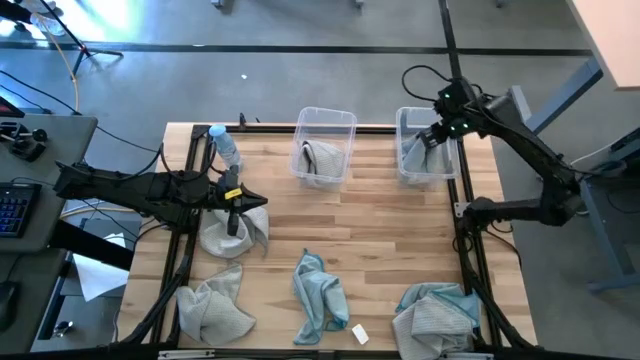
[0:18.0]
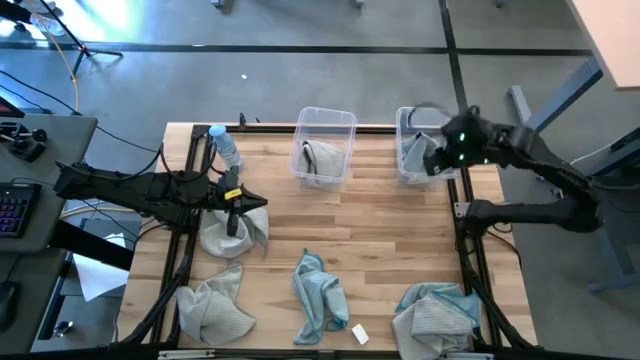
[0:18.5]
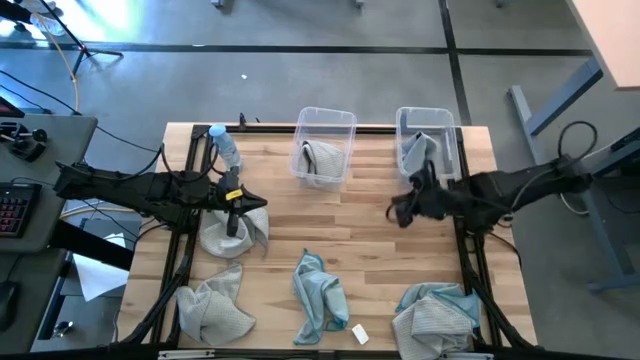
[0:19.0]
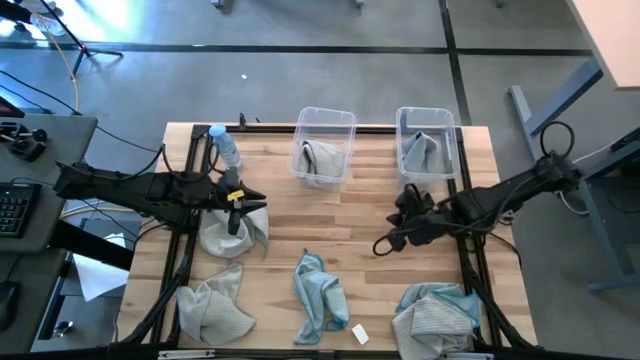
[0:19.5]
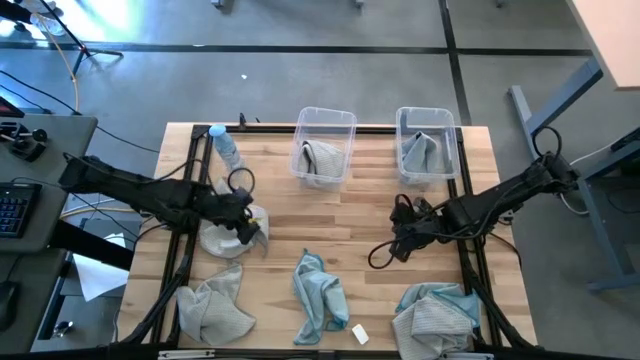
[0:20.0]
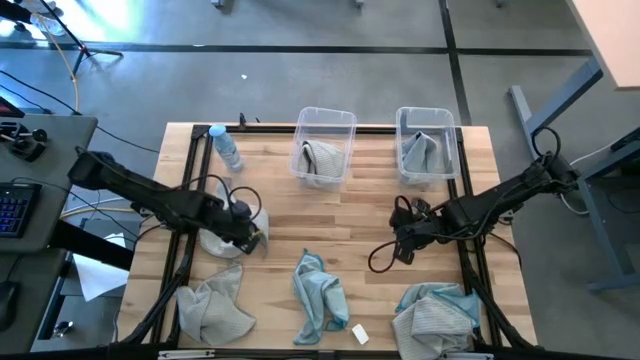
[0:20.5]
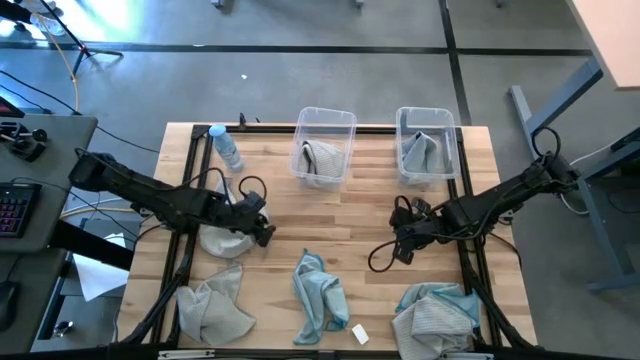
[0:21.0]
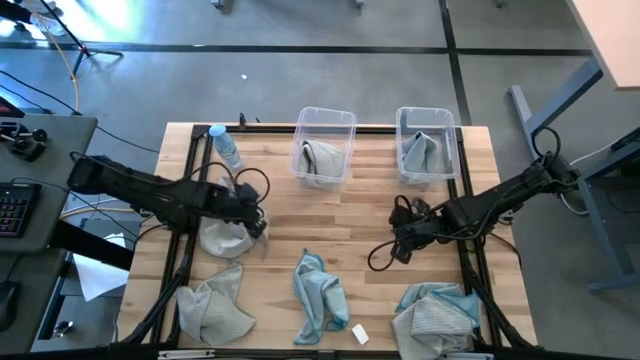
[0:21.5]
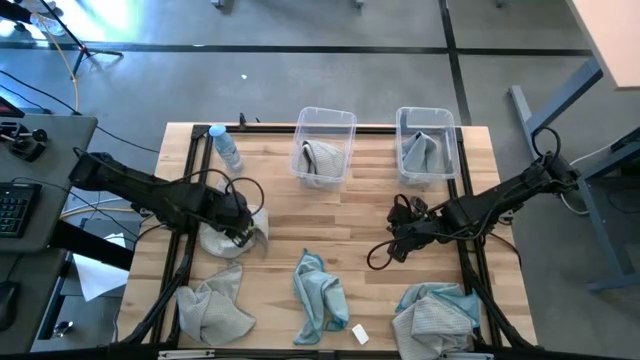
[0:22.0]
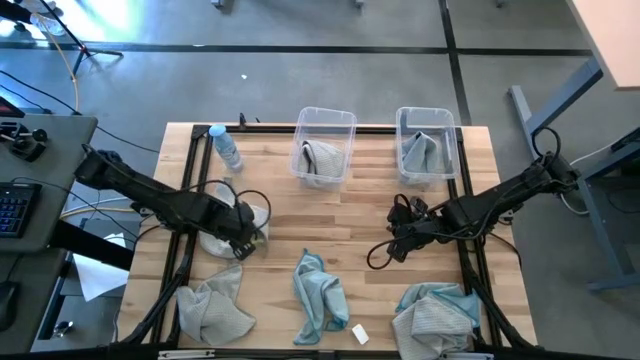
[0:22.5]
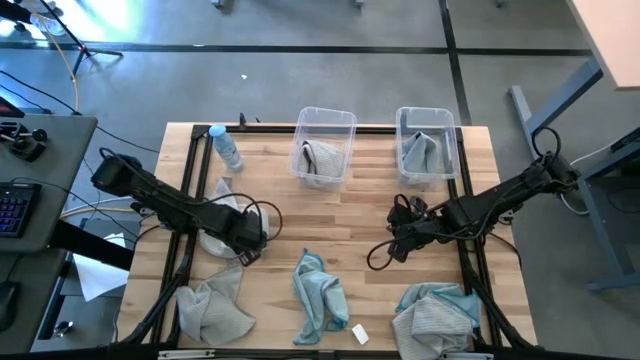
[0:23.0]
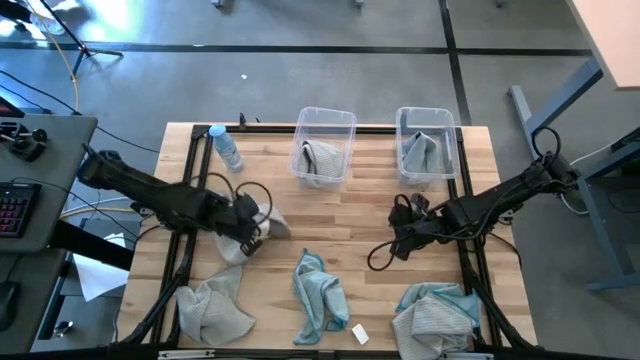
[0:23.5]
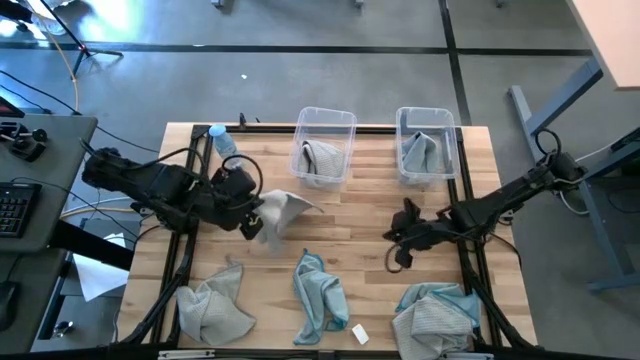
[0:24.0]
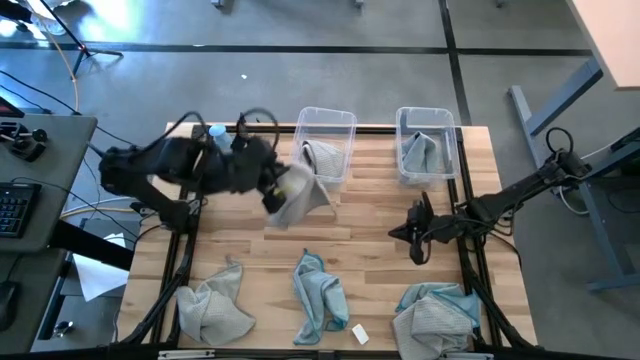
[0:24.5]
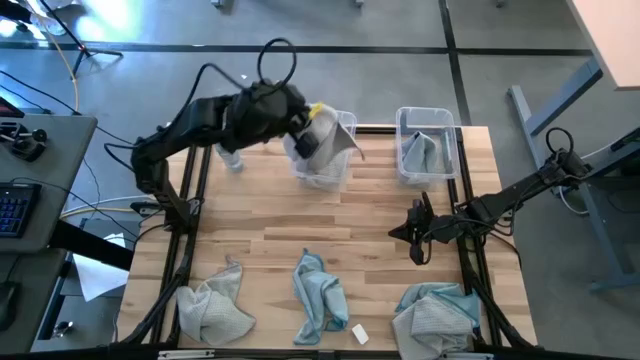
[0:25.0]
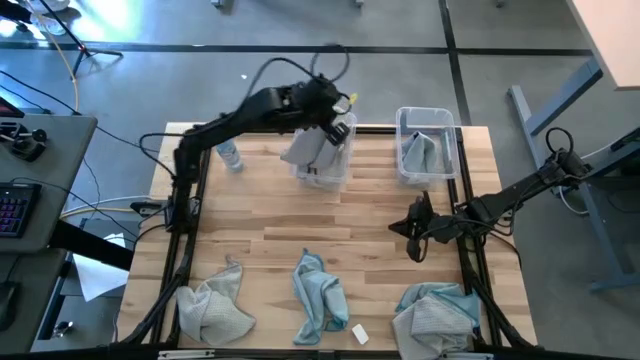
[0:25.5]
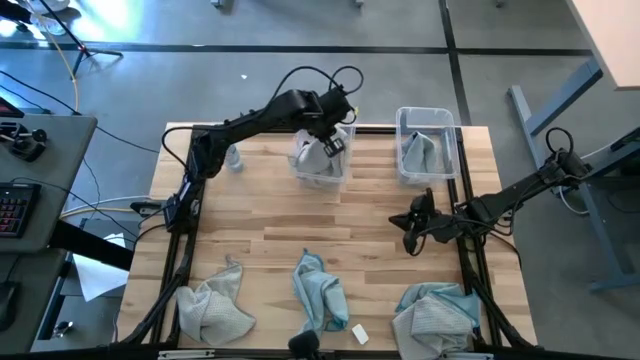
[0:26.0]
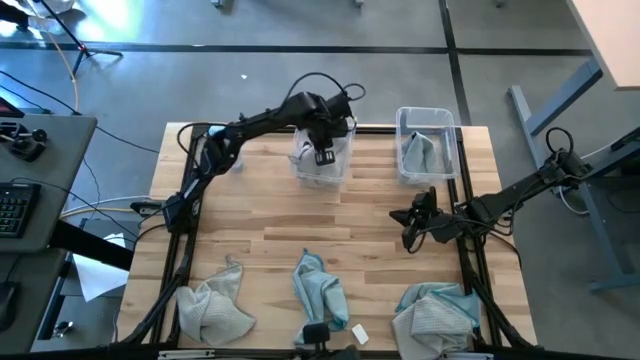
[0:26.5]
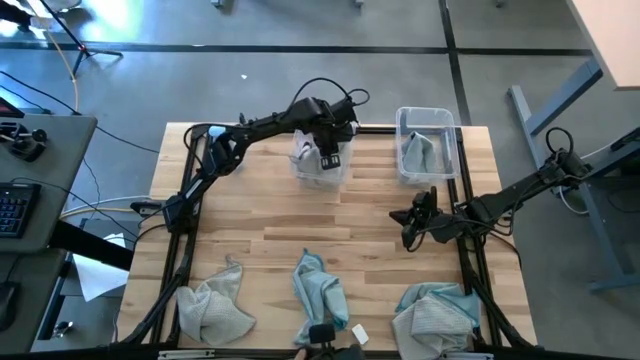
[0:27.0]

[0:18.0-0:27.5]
Task: Sort microfiber towel by color & place in baskets
Put the white microfiber cloth into the left transparent bin

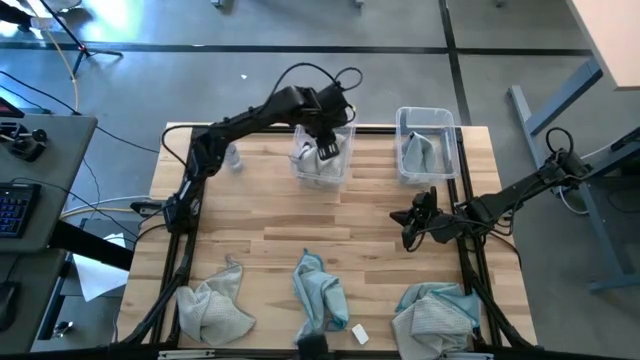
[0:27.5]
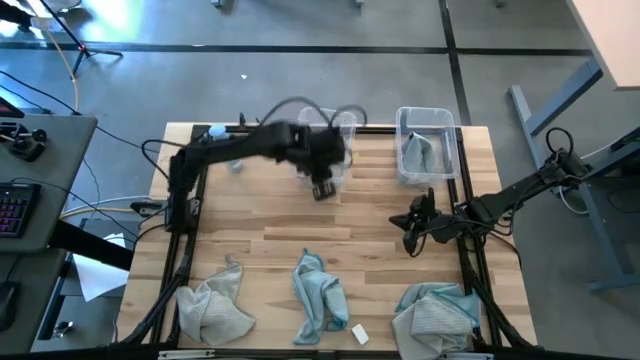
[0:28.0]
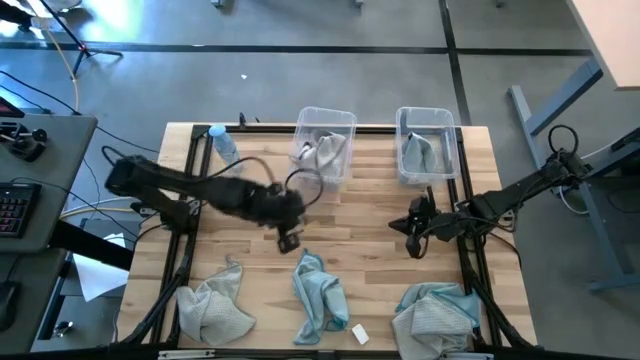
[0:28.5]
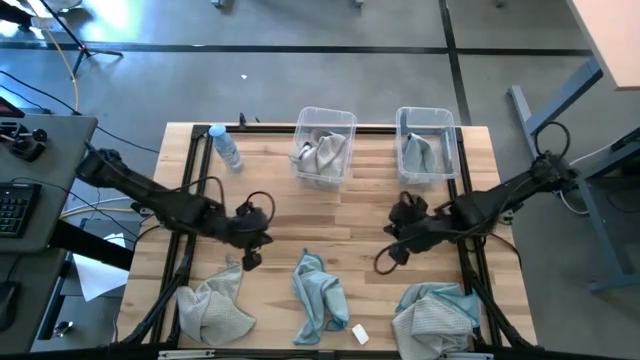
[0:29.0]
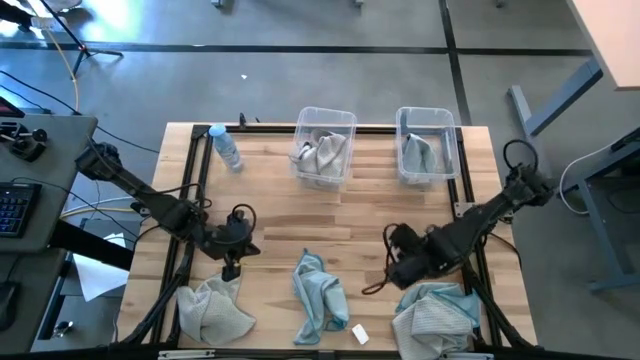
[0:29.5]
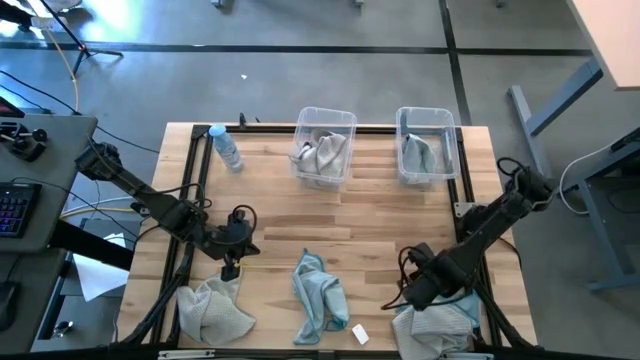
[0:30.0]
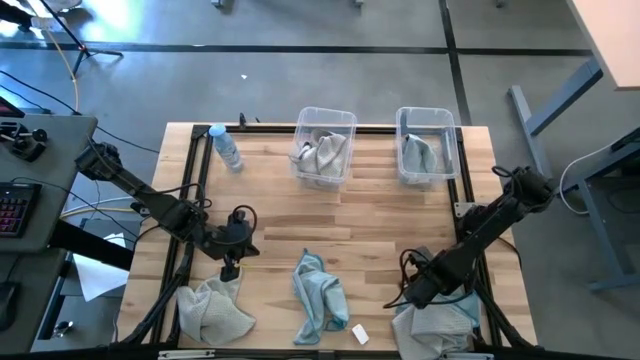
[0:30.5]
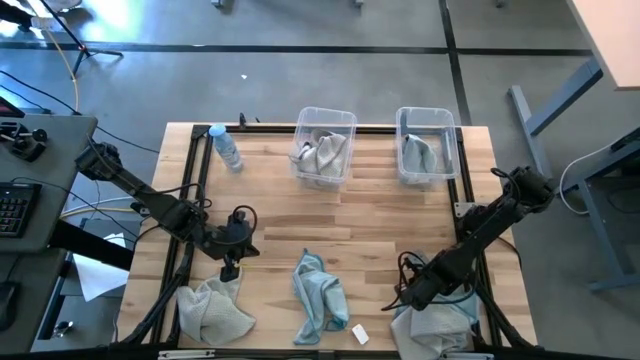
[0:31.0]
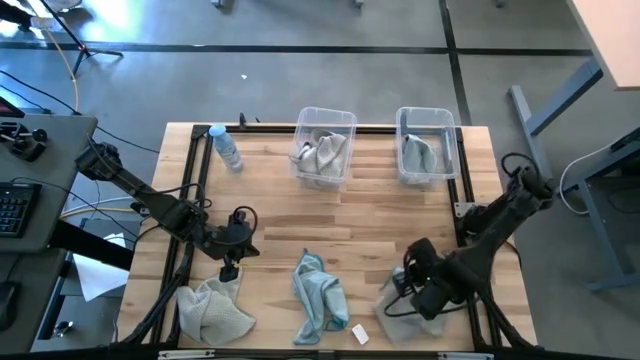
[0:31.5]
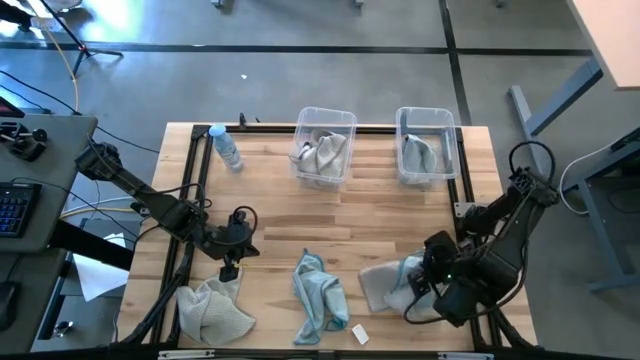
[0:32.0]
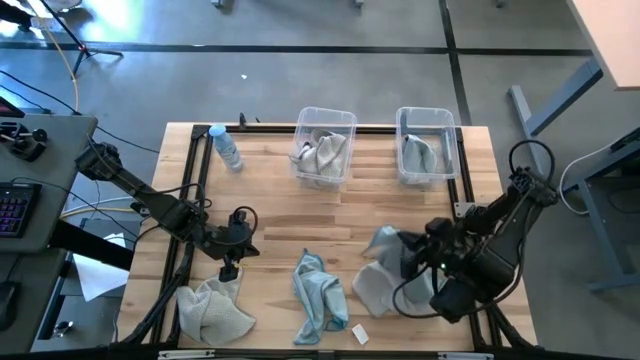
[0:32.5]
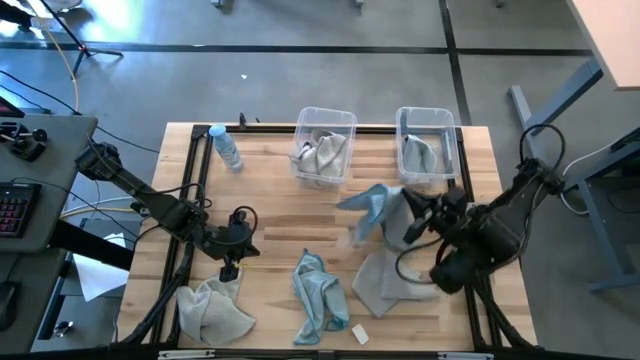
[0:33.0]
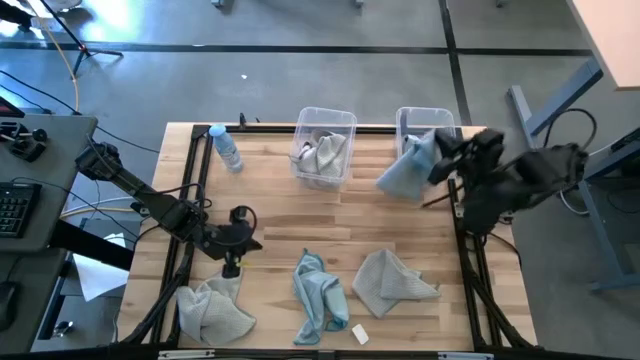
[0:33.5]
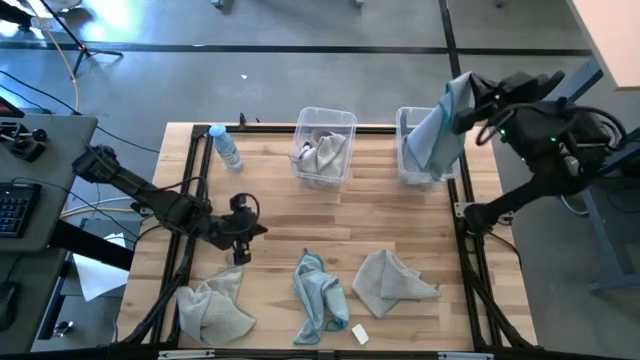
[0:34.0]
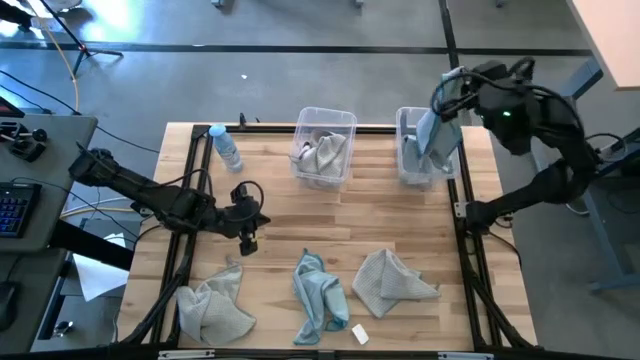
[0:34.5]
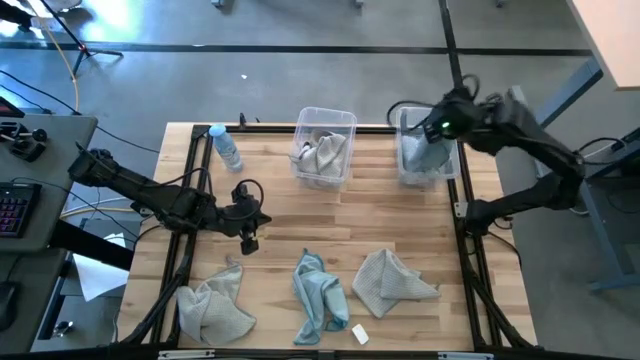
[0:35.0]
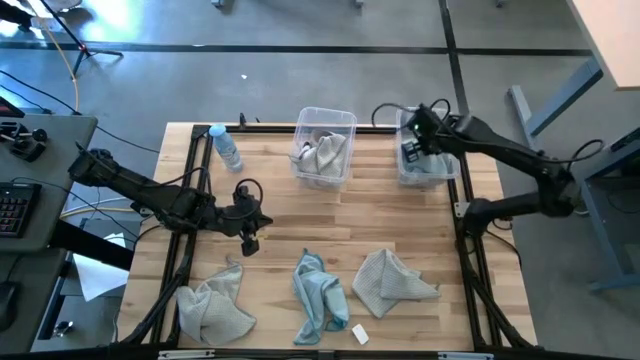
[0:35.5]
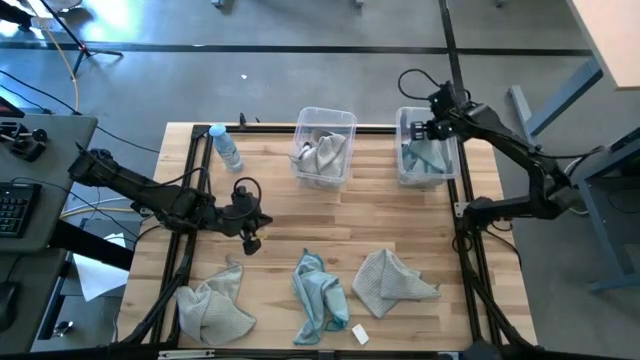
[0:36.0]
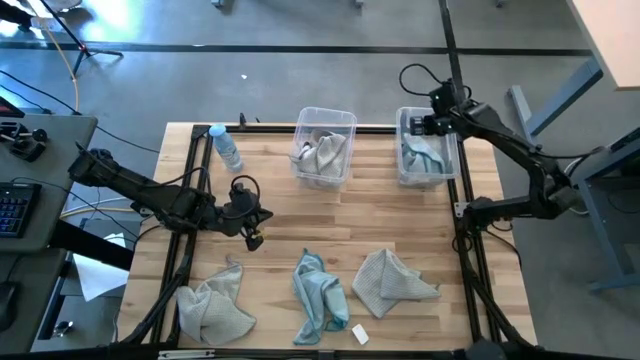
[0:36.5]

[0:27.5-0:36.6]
Put the light blue microfiber cloth into the right transparent bin

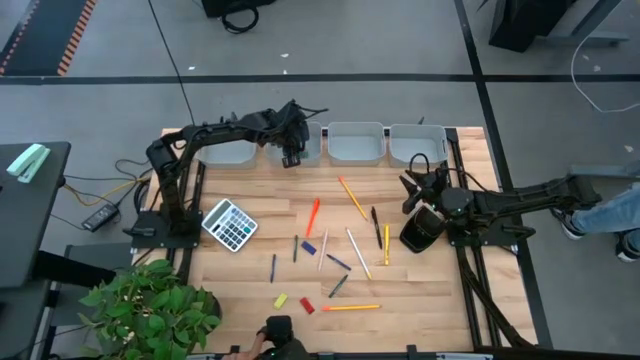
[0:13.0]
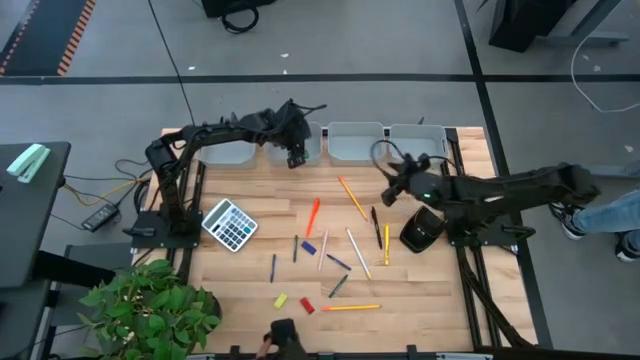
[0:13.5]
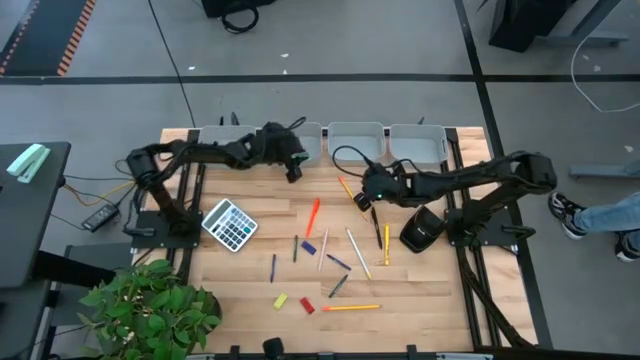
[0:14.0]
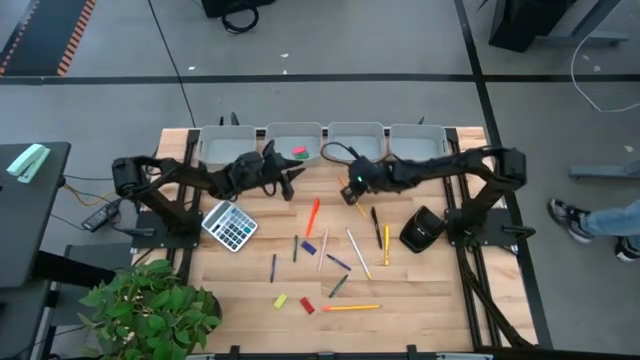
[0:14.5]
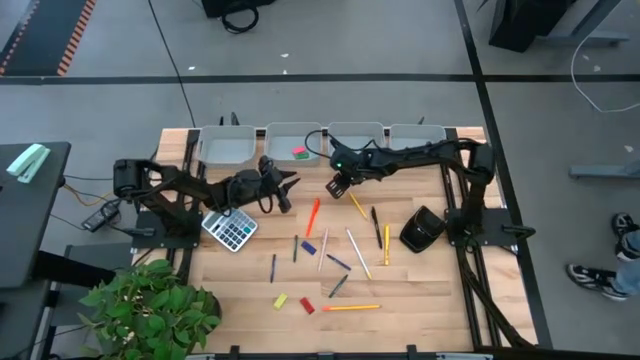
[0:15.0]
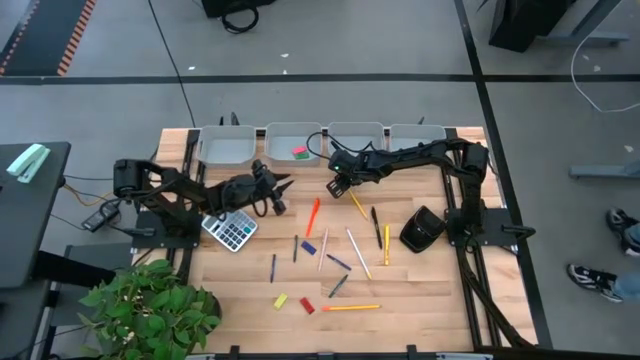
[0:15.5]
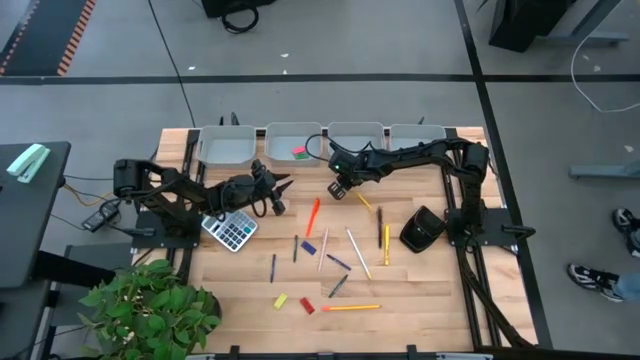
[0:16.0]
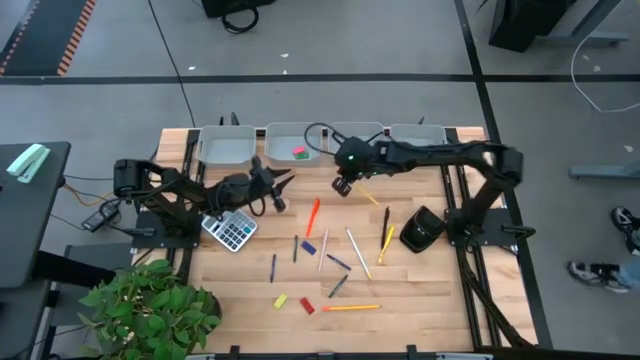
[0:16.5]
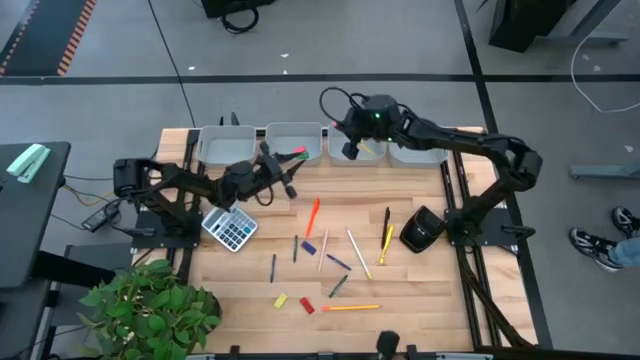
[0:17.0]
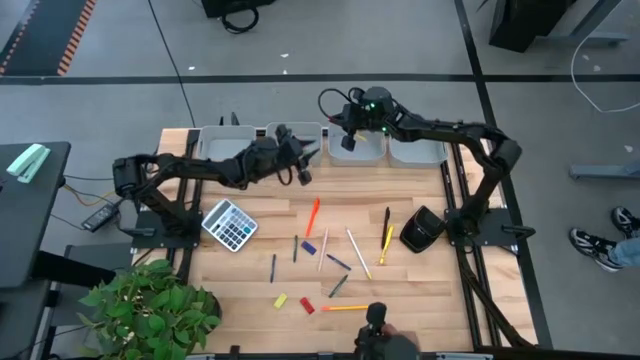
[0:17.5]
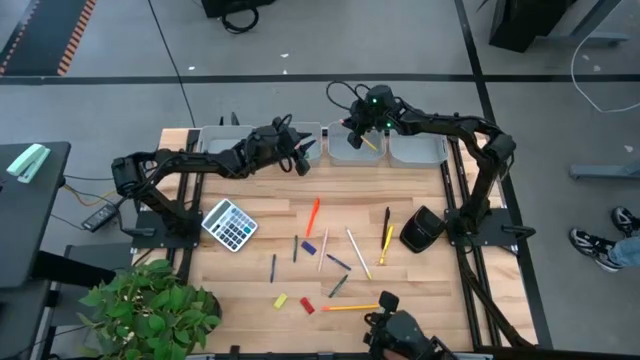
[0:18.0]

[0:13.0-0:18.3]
Task: Sort crayons/erasers/pens/pencils in bins
Put the top yellow pencil into the gray bin
